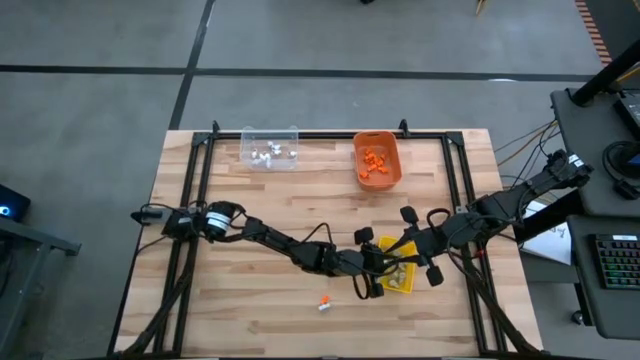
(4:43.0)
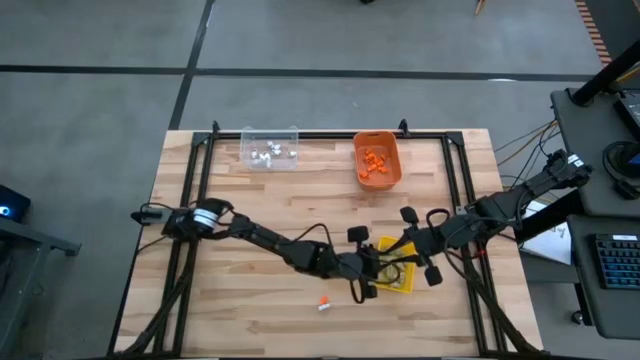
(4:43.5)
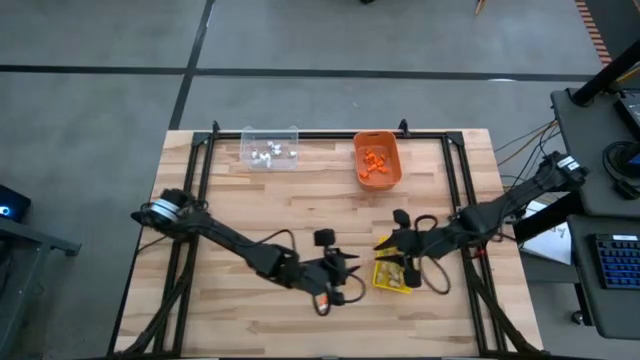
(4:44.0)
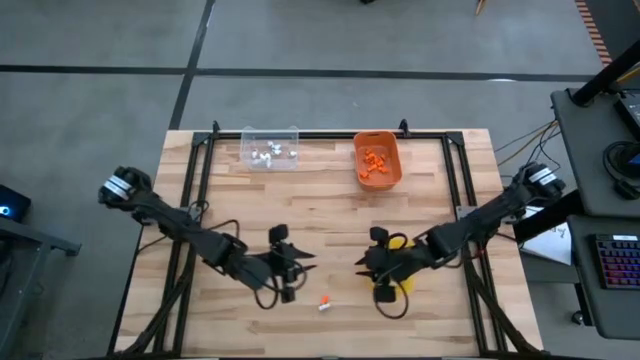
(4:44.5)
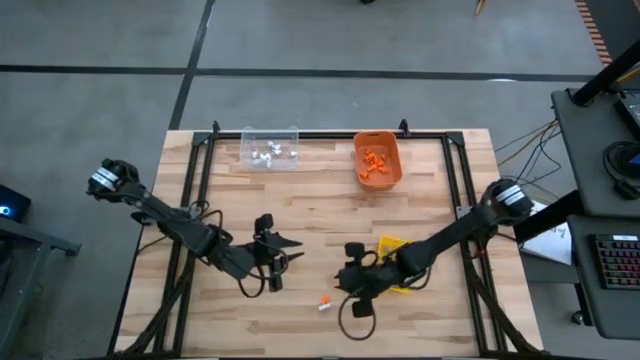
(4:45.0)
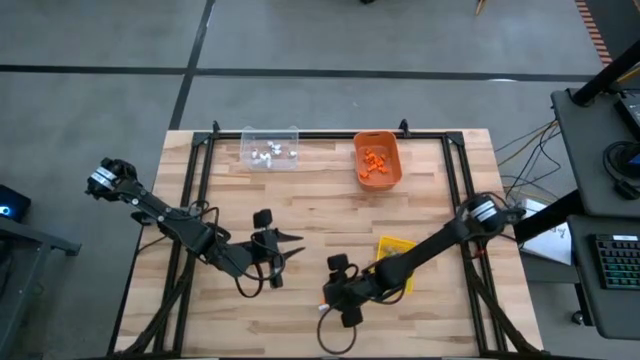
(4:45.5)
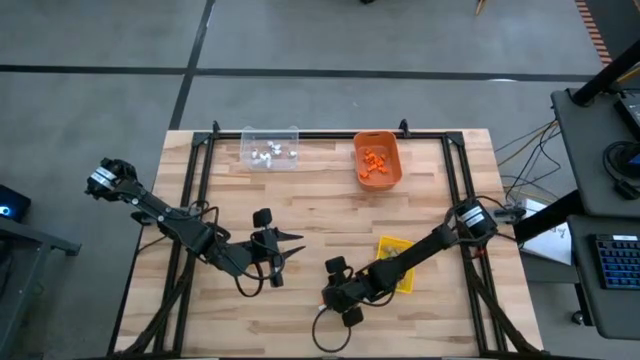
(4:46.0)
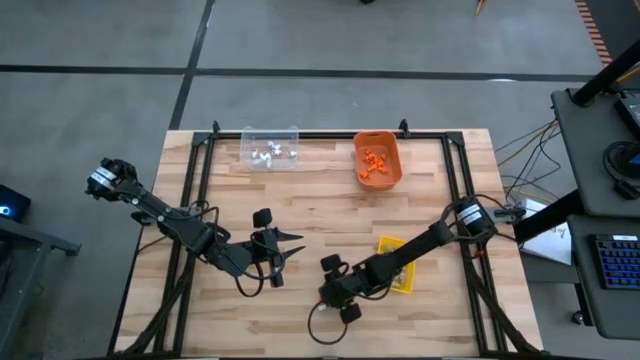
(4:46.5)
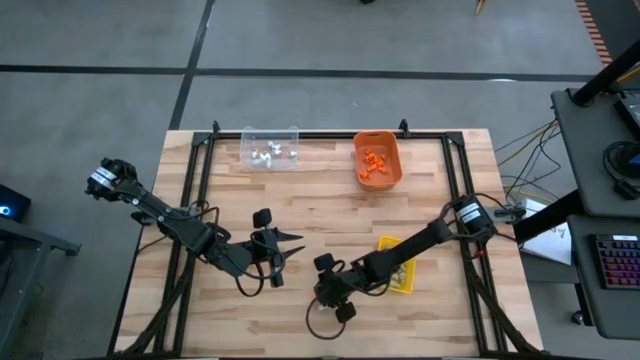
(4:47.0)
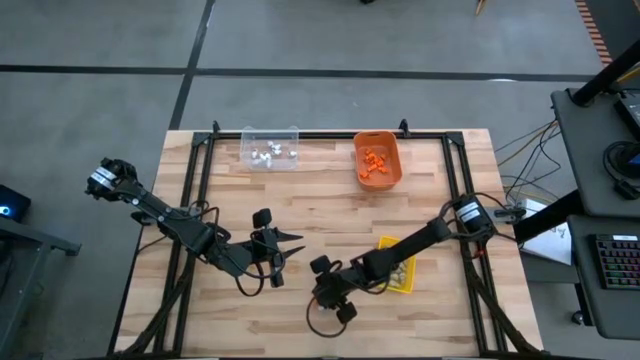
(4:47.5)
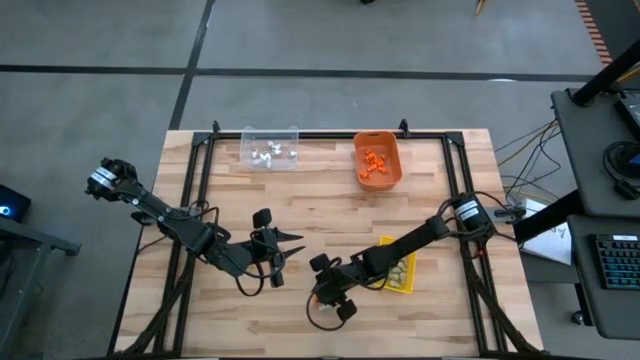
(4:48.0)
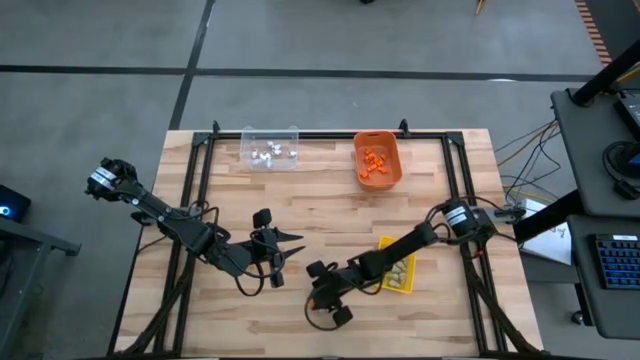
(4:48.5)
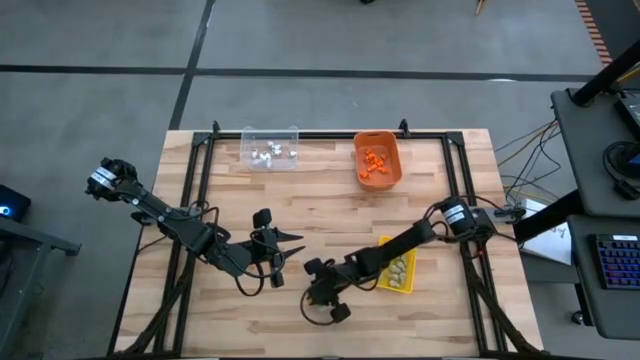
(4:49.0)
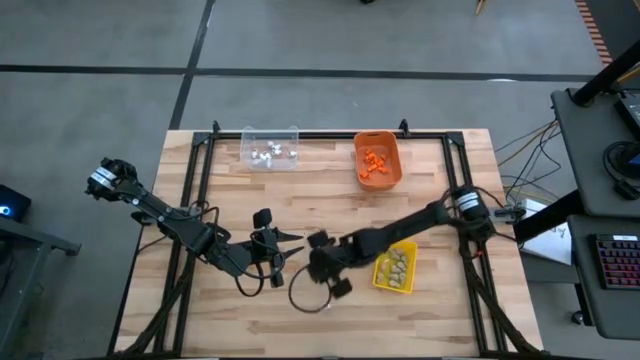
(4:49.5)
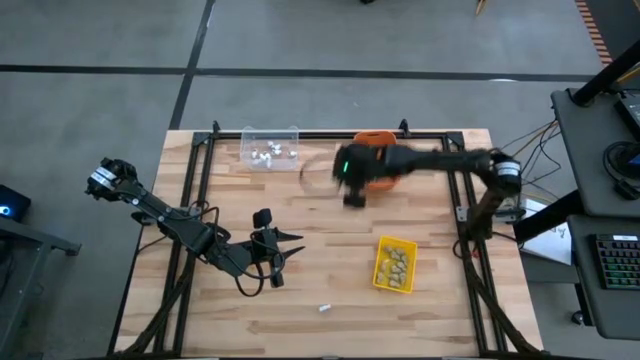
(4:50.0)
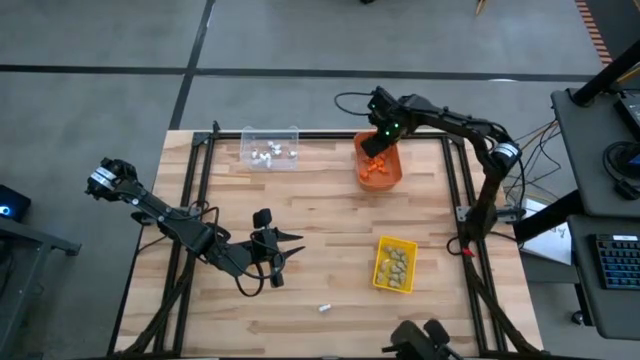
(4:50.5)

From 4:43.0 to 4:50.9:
Task: Sort Halloween decoration
Put the orange skeleton toy into the yellow bin

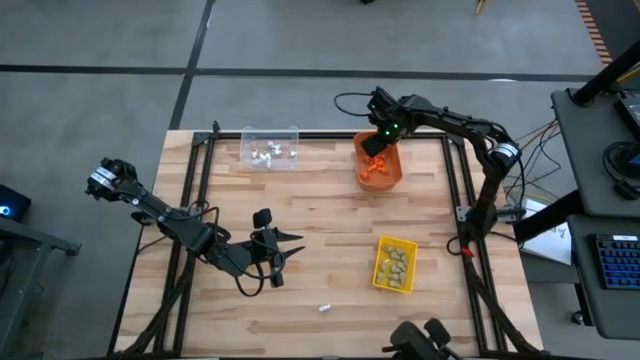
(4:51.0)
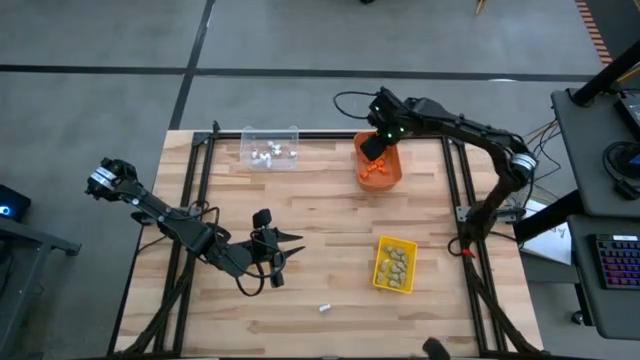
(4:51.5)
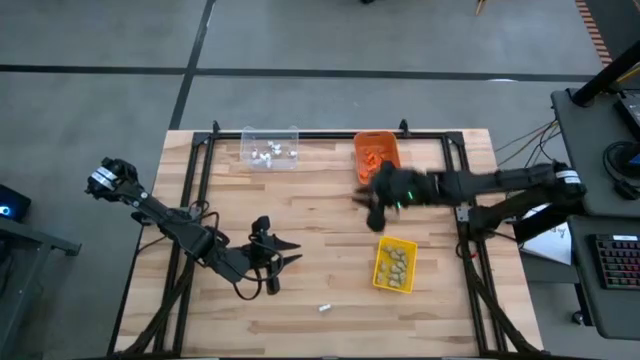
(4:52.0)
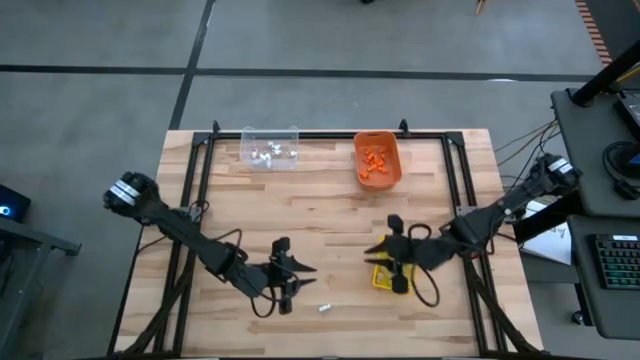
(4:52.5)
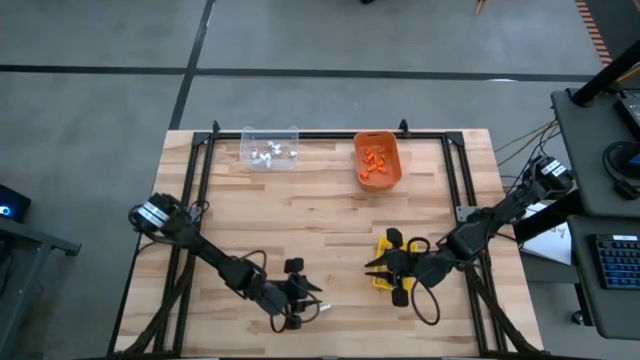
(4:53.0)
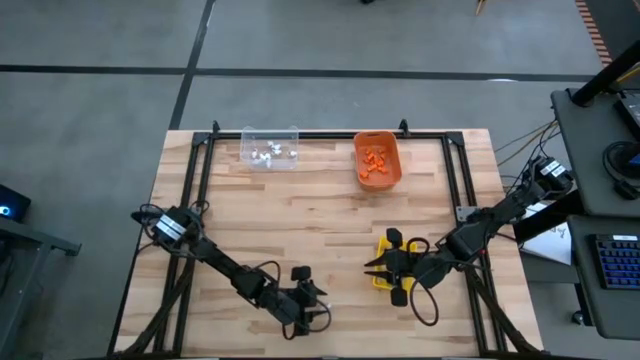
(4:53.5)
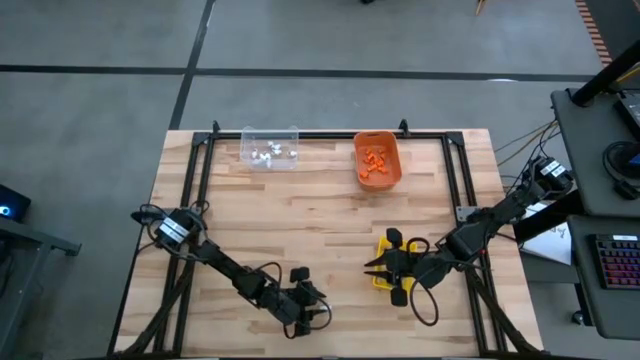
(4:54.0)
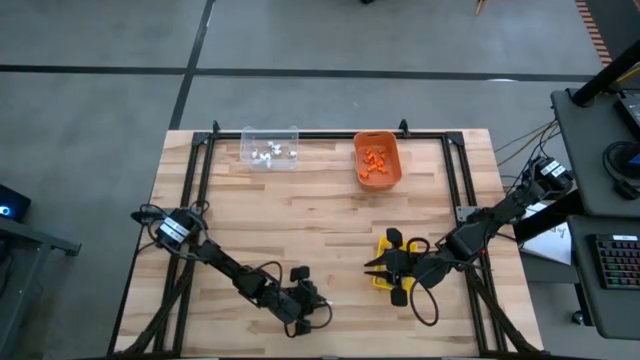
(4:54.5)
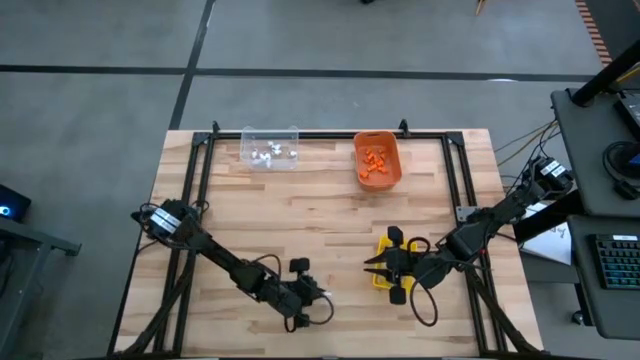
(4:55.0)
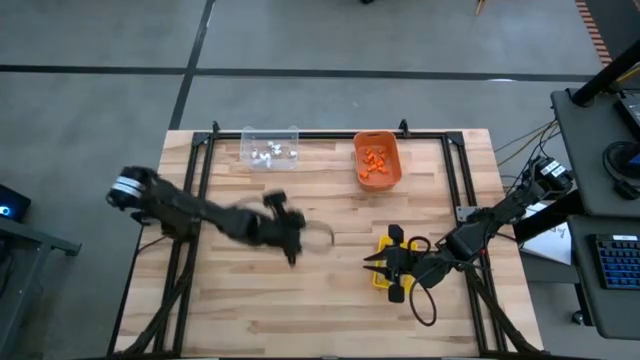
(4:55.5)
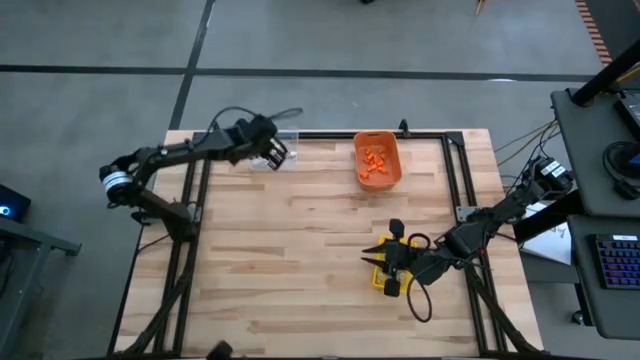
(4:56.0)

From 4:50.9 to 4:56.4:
Put the white skeleton toy into the transparent bin

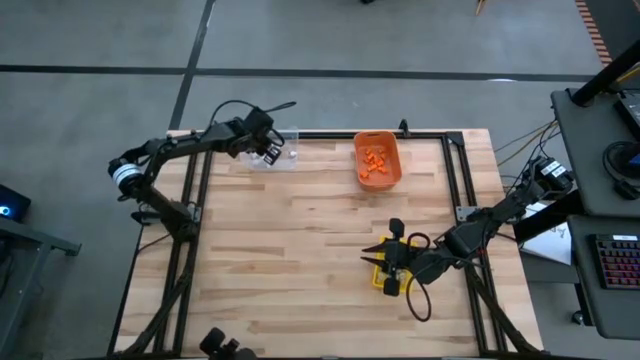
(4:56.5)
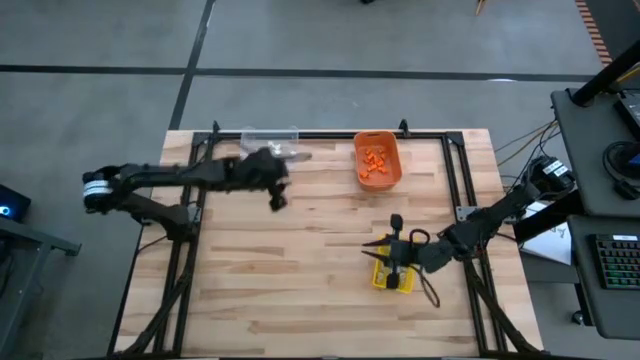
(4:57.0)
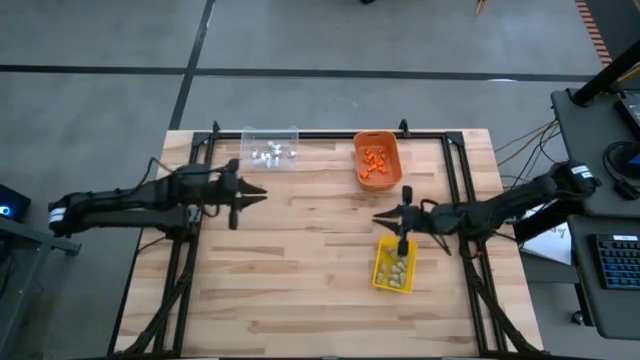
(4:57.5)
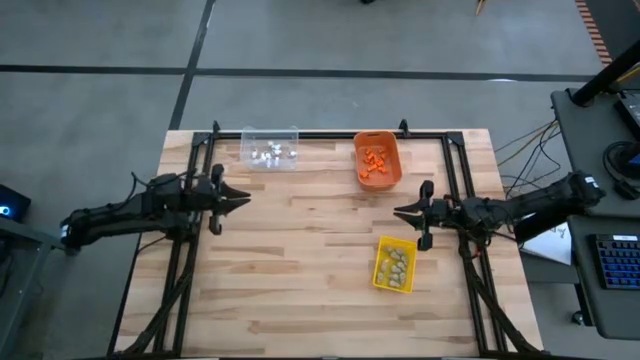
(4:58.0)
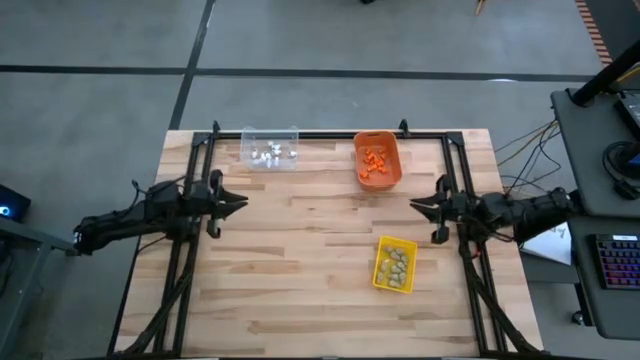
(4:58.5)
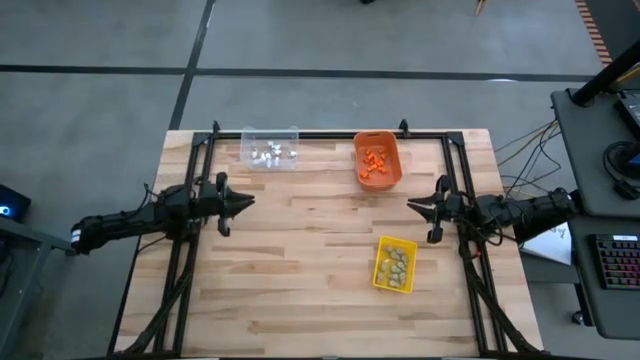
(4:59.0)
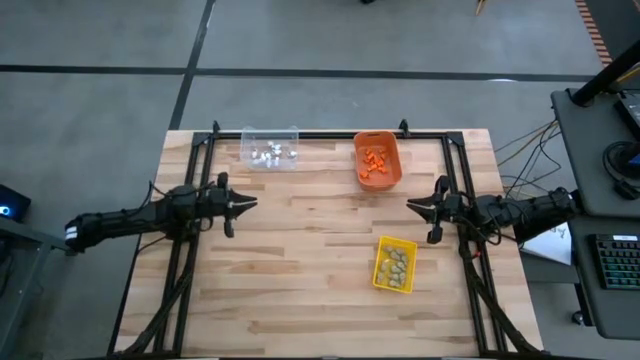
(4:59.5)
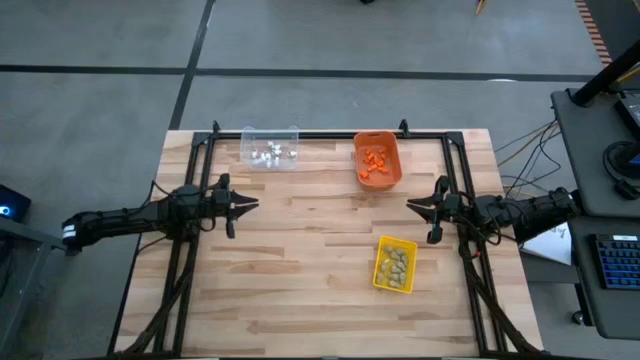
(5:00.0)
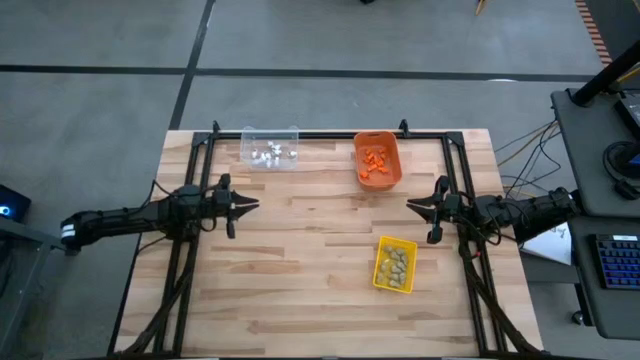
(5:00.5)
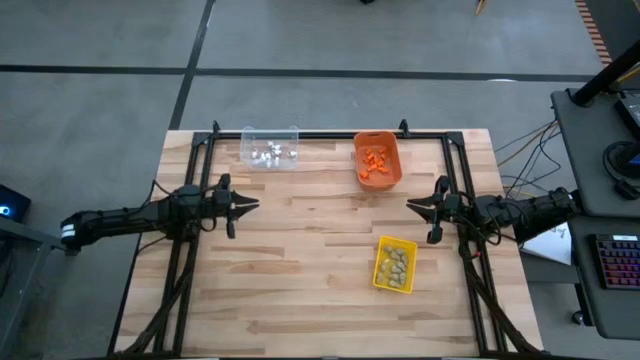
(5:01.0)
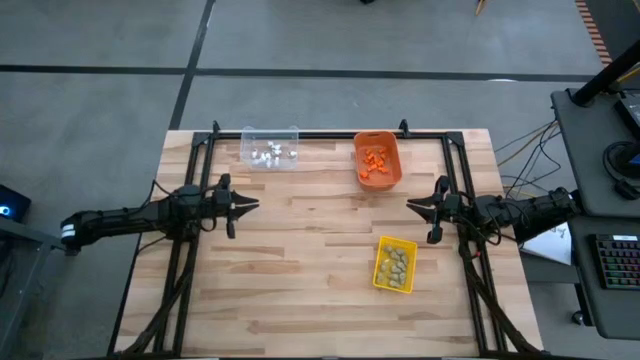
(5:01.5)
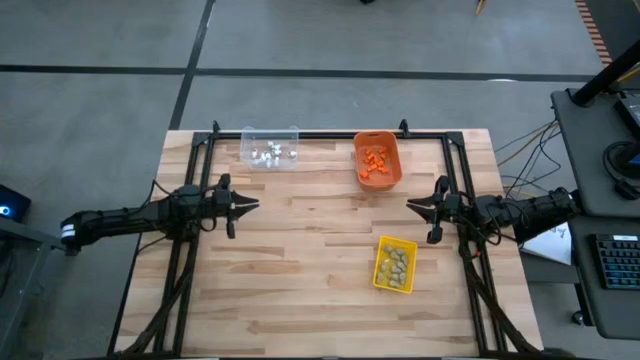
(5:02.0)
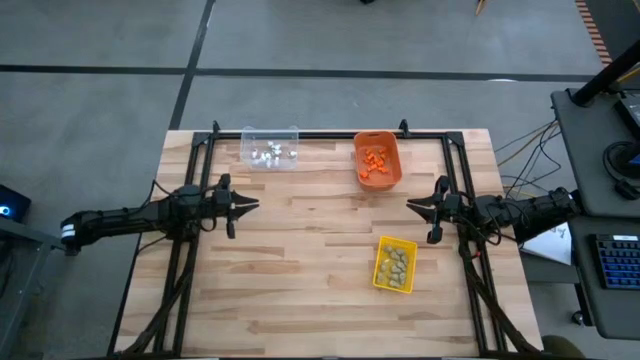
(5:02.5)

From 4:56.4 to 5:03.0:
Return to Home Position

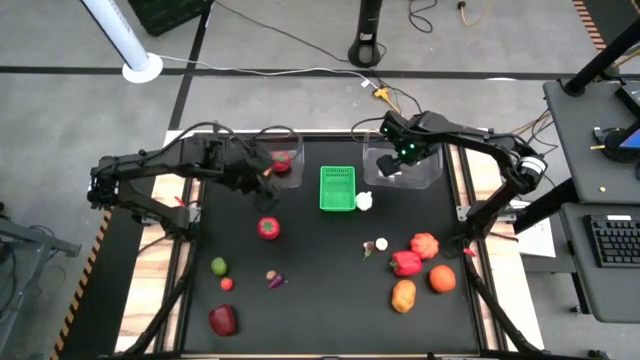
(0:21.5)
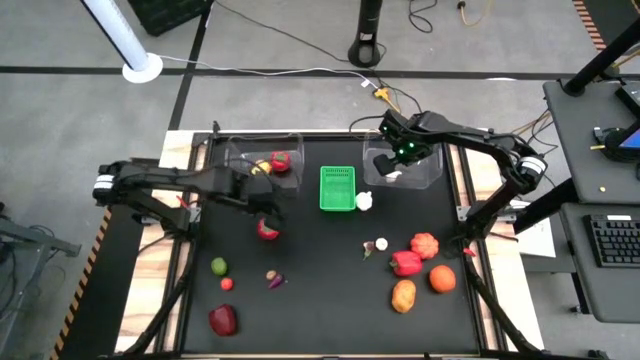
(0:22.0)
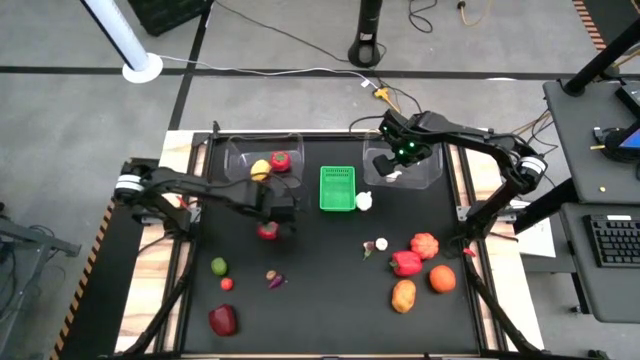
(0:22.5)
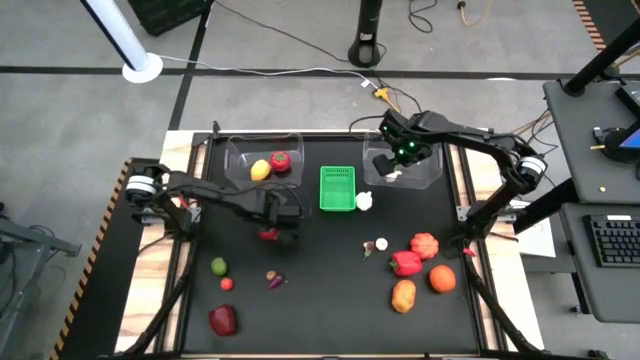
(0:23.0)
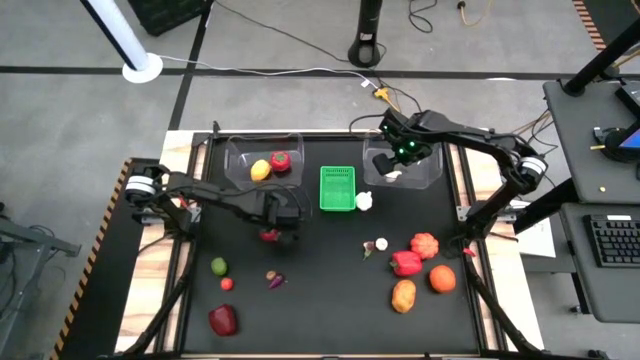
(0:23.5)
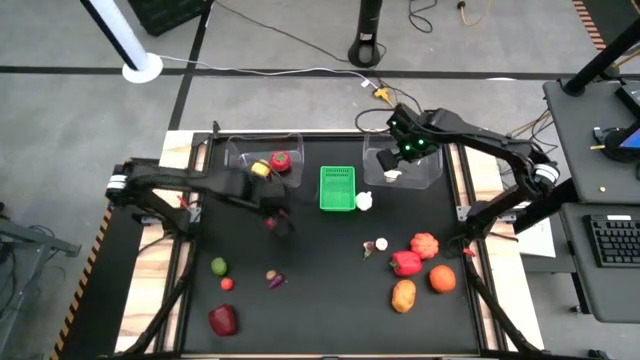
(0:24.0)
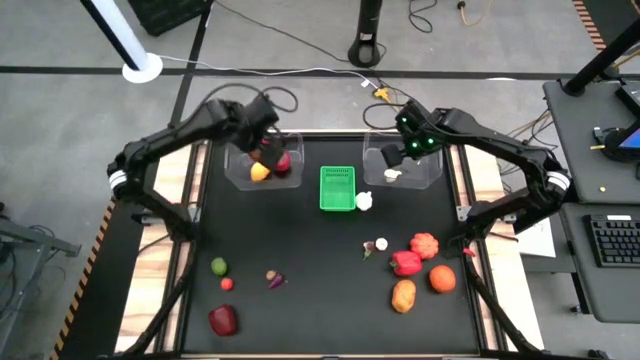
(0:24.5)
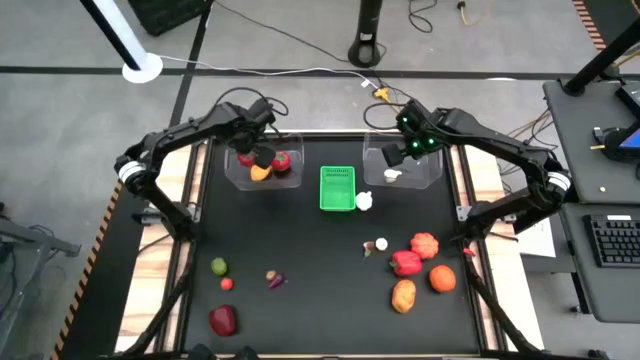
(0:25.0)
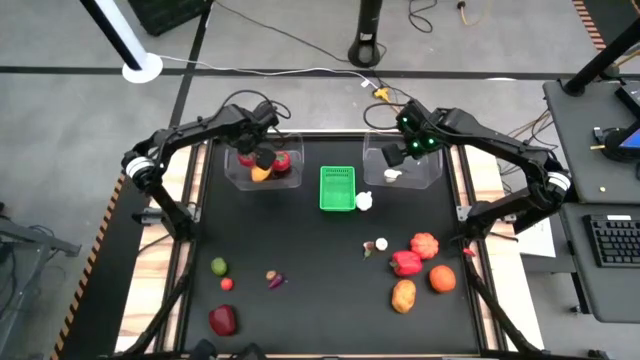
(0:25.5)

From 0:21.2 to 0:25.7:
Task: Sort produce into baskets
Put the big tomato into the left transparent bin
